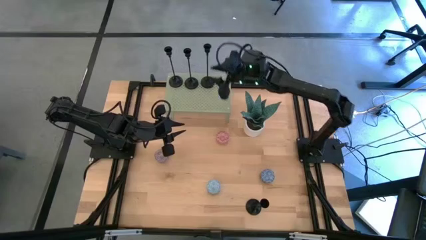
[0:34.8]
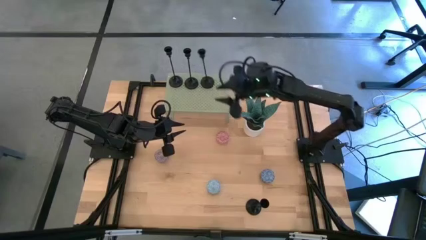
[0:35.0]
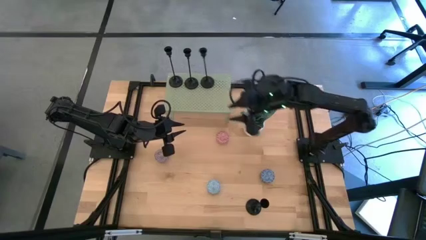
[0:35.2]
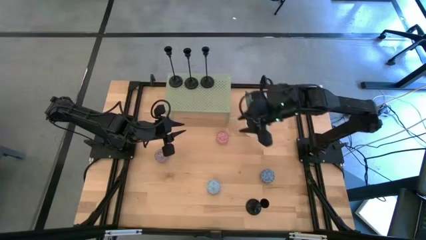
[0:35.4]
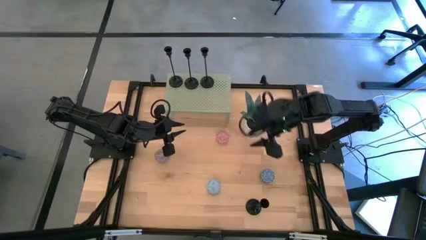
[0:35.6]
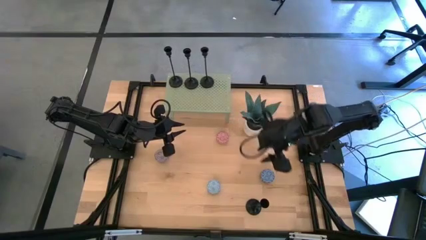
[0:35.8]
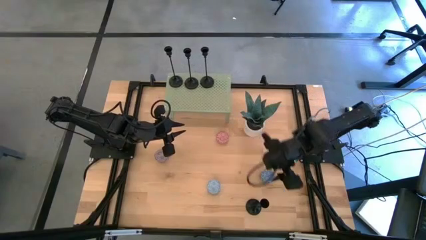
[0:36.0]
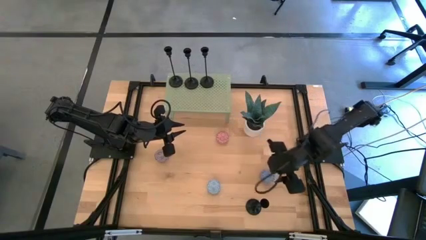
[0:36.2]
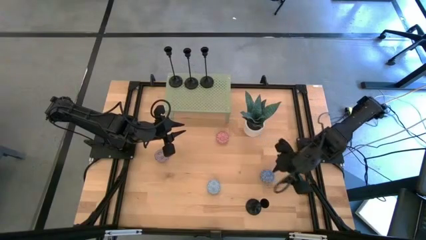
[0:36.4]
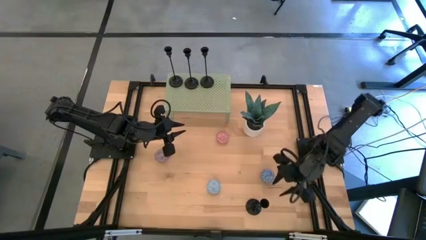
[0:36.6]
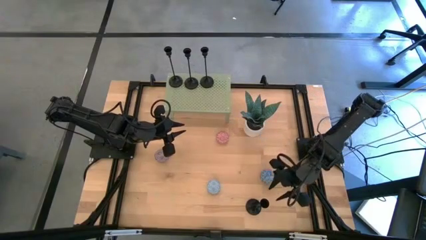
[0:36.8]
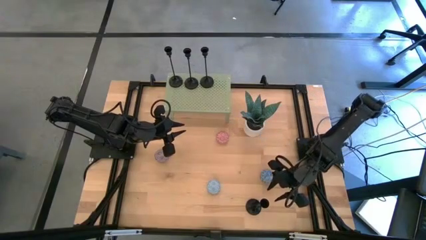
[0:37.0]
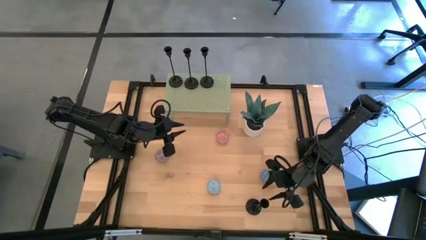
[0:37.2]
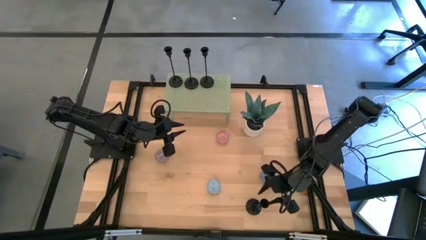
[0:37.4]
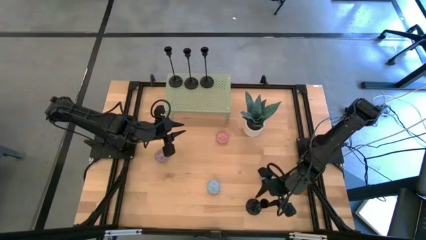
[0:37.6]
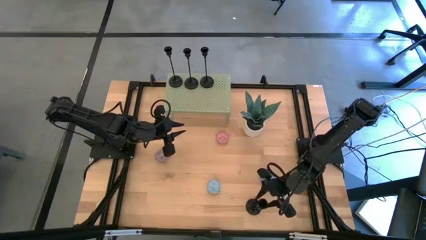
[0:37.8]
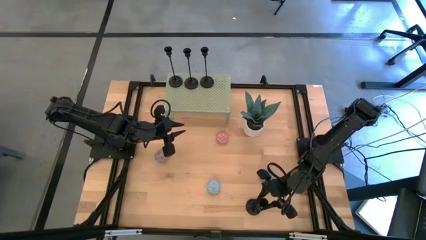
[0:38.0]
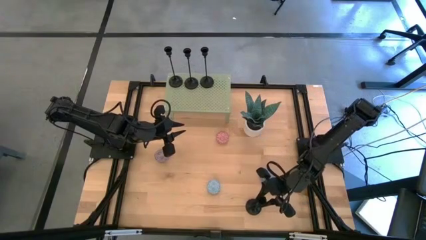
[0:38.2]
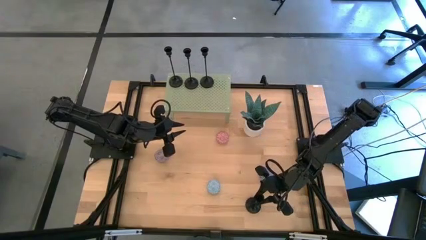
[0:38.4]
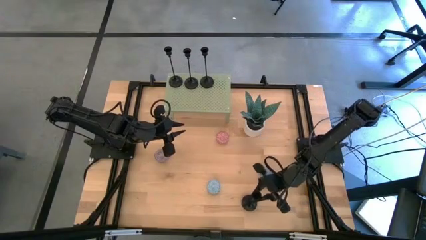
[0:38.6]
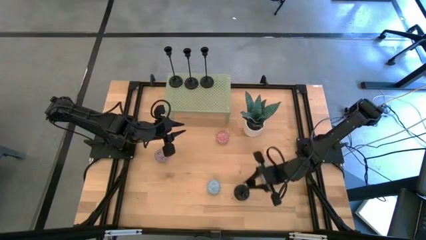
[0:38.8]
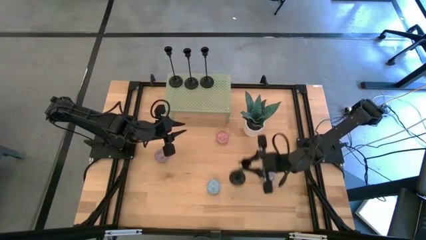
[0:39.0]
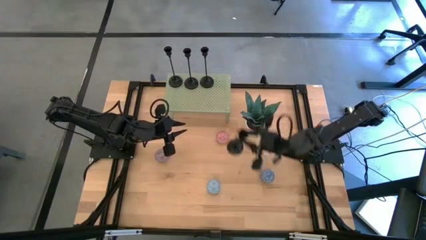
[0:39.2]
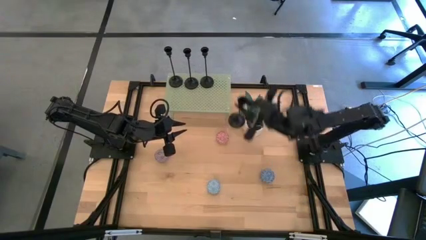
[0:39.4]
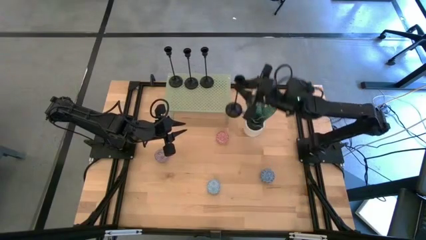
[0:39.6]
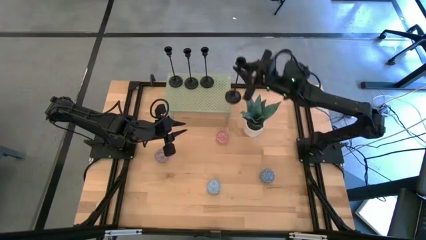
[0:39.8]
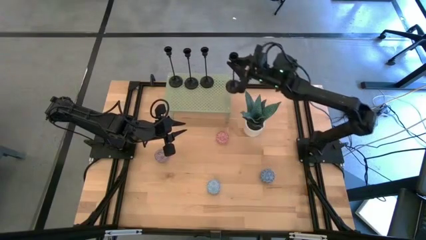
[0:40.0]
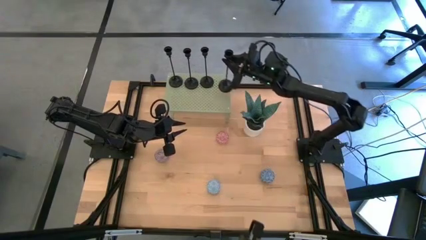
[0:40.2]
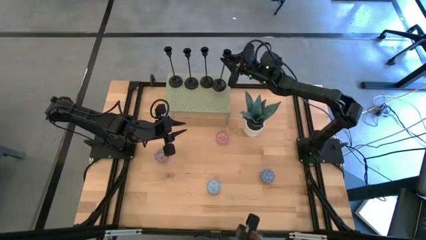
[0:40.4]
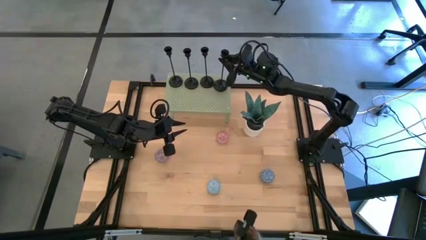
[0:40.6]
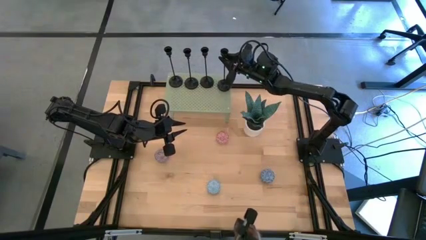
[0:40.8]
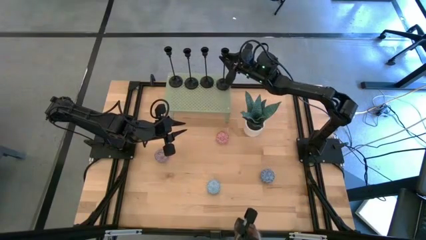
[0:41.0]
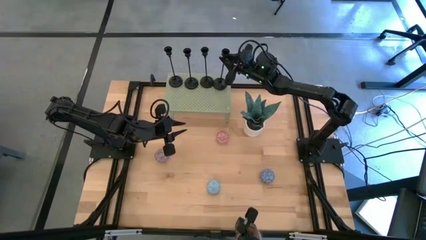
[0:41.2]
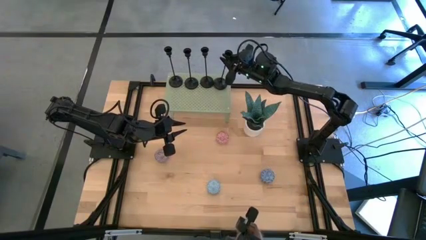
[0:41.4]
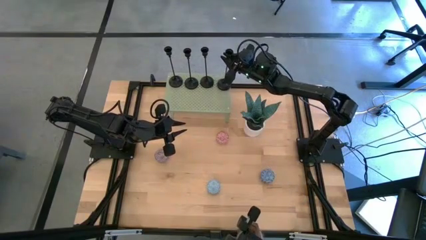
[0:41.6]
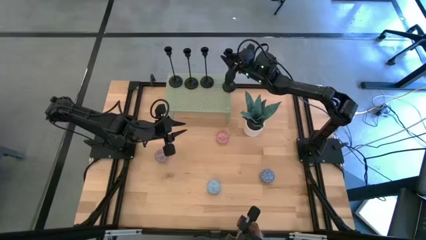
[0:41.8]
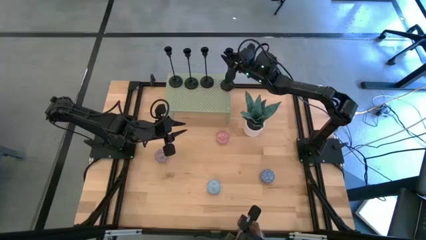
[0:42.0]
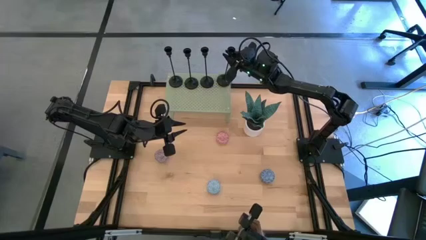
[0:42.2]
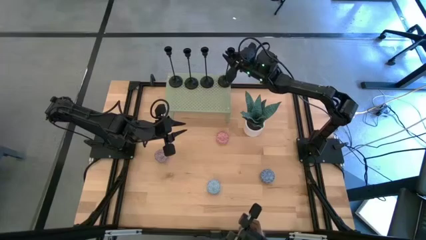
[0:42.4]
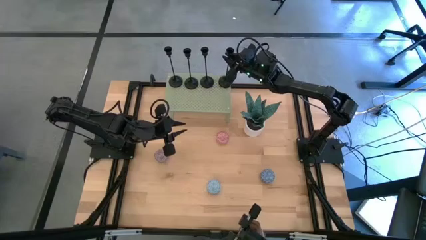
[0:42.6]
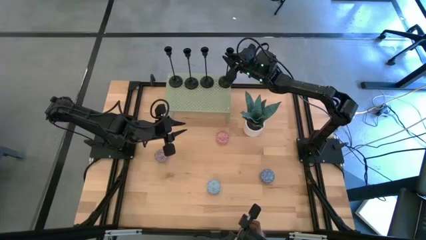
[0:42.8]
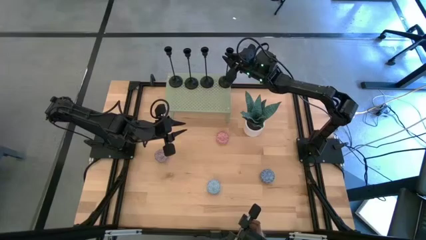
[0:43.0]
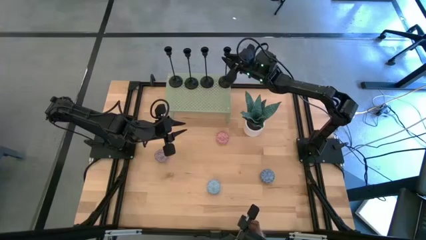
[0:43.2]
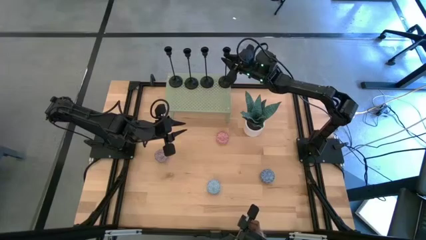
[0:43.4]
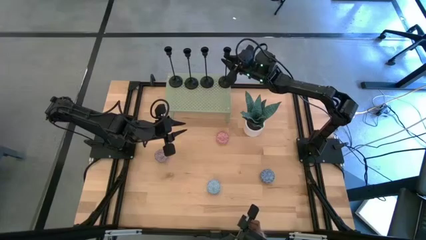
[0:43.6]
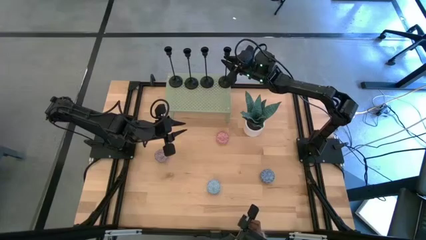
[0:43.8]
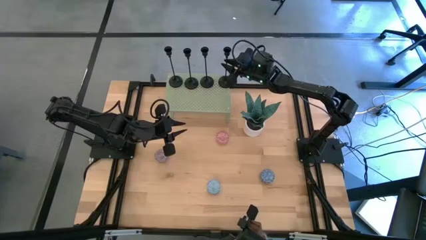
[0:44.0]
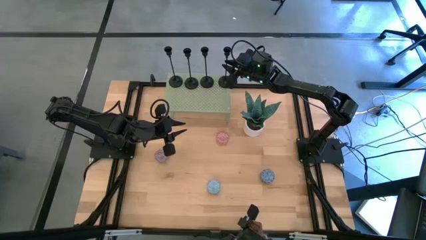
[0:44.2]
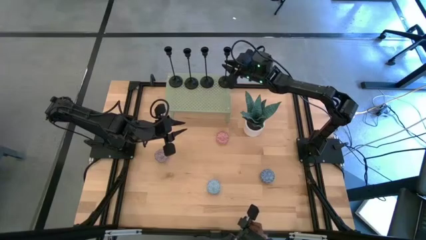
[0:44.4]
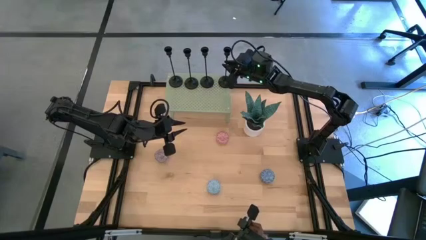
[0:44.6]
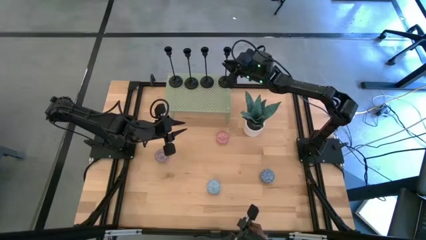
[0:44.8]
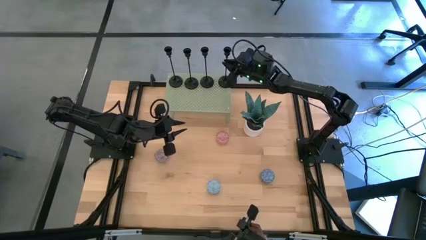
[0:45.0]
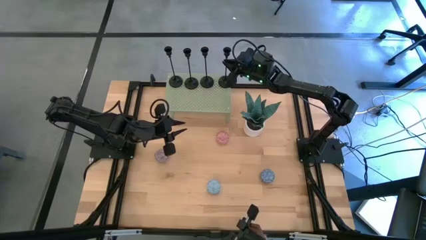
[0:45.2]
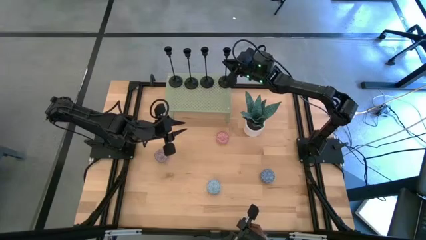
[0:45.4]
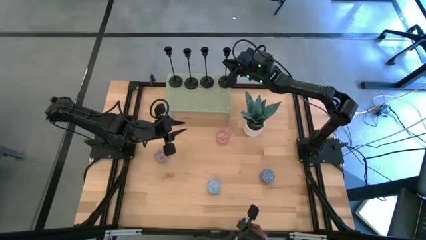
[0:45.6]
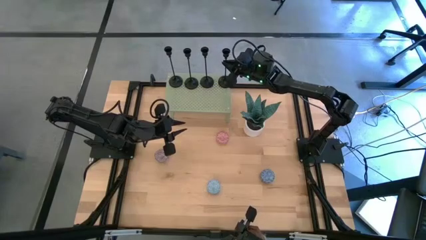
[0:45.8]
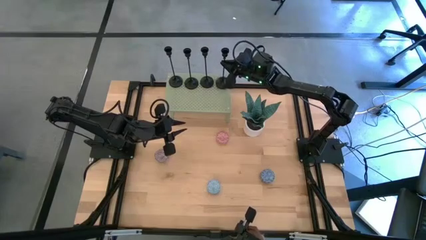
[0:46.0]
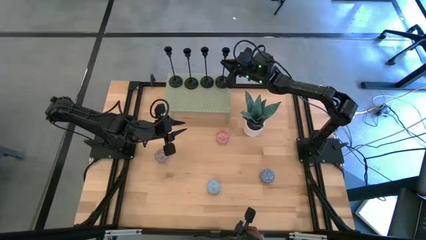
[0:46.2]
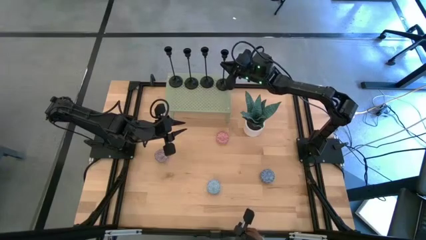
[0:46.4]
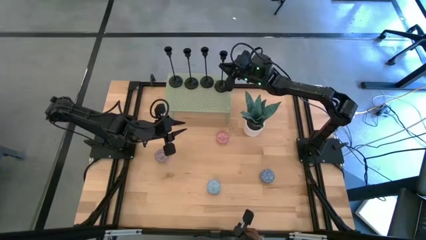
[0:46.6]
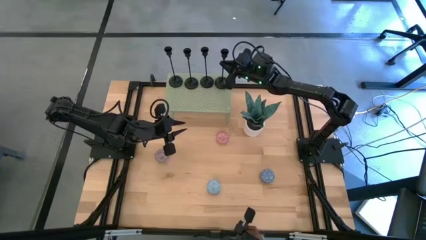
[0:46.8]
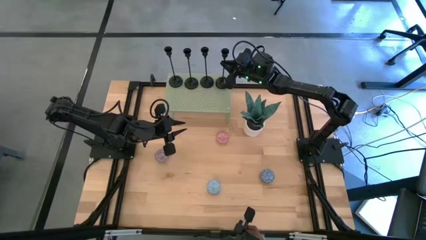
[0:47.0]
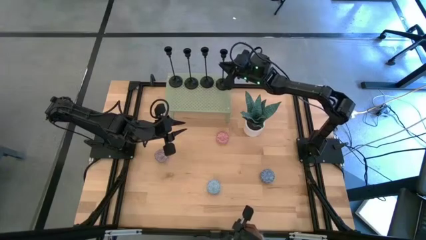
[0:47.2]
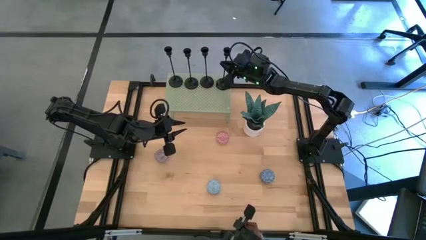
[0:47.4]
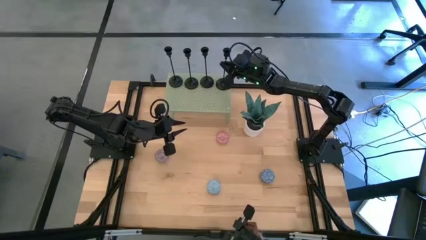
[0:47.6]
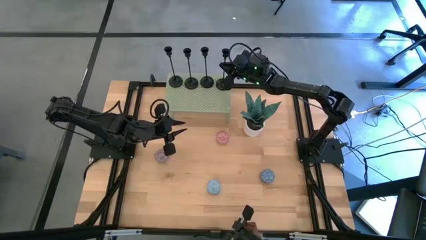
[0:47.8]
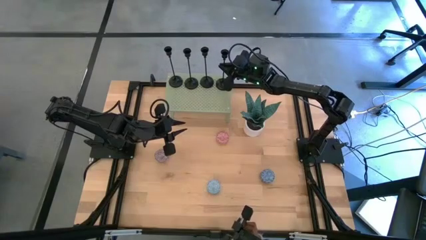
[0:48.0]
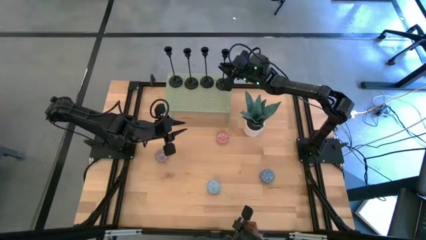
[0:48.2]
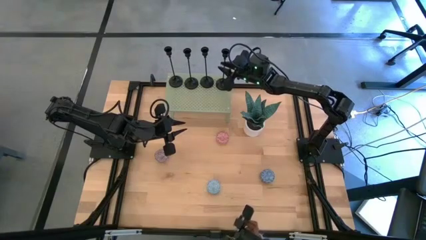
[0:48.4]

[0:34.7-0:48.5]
Task: Pick & Place candle stick holders
Align the black candle holder with the other black candle holder on the shelf
